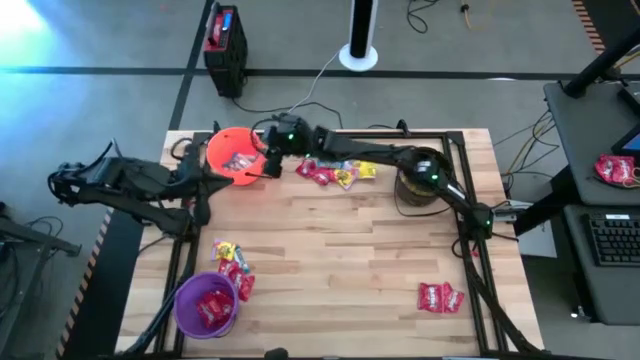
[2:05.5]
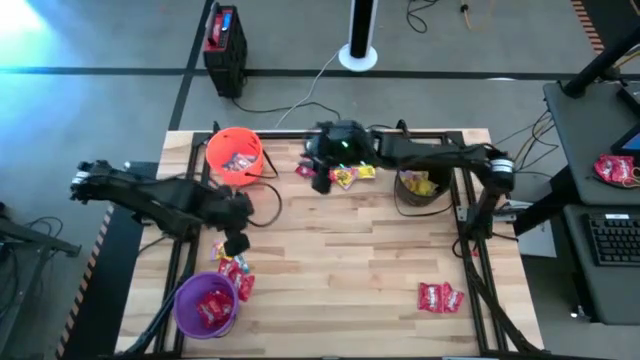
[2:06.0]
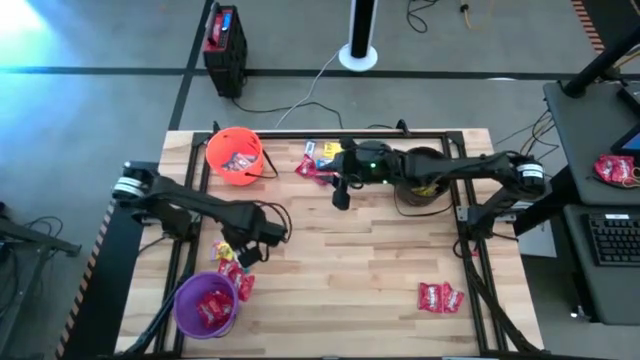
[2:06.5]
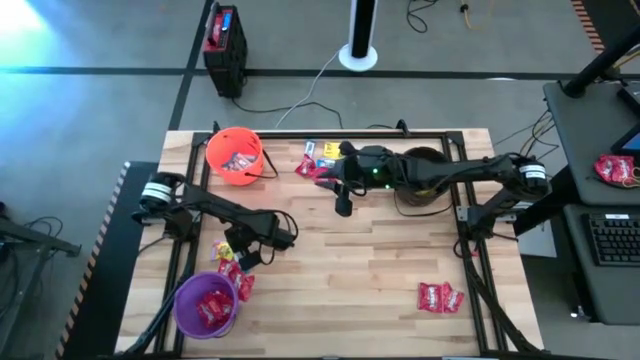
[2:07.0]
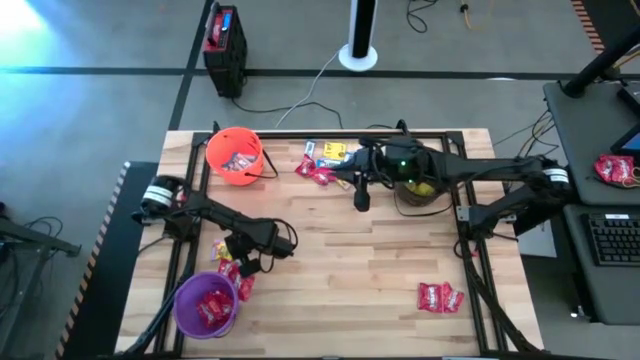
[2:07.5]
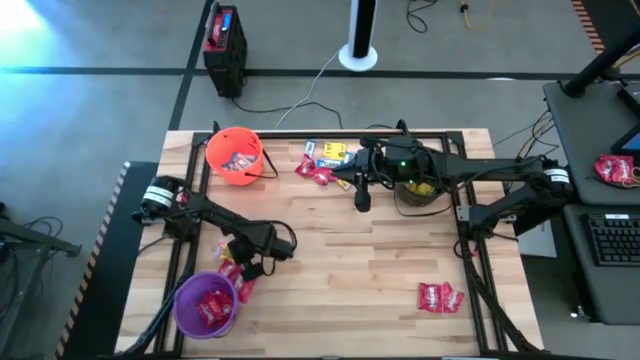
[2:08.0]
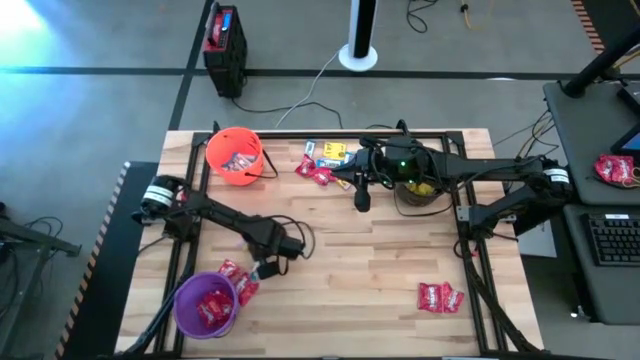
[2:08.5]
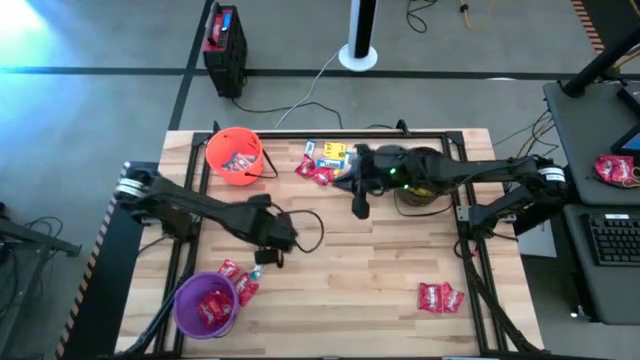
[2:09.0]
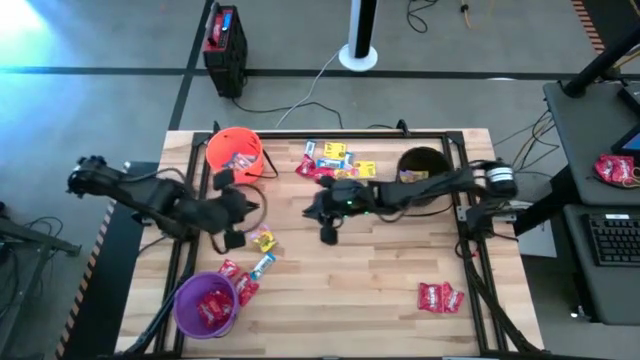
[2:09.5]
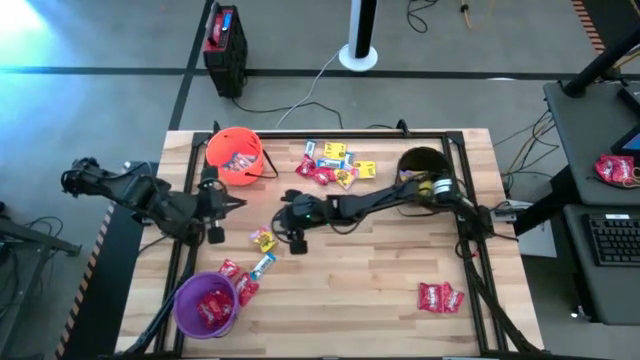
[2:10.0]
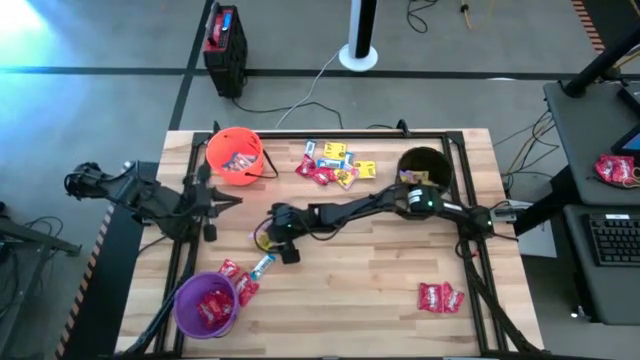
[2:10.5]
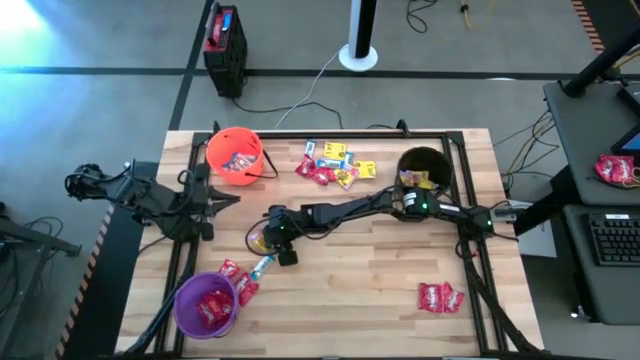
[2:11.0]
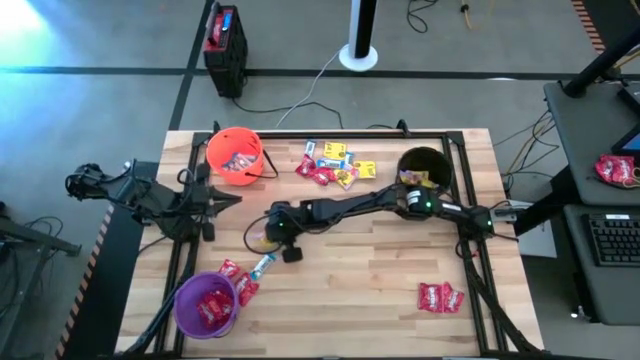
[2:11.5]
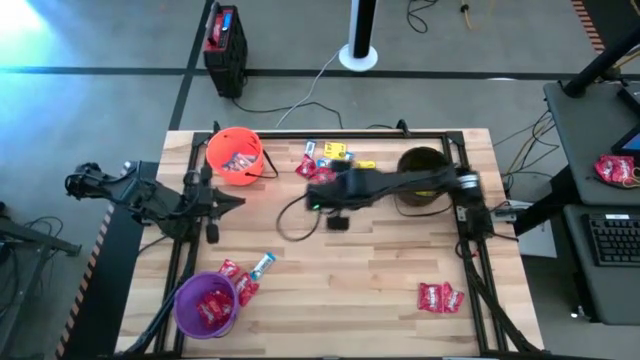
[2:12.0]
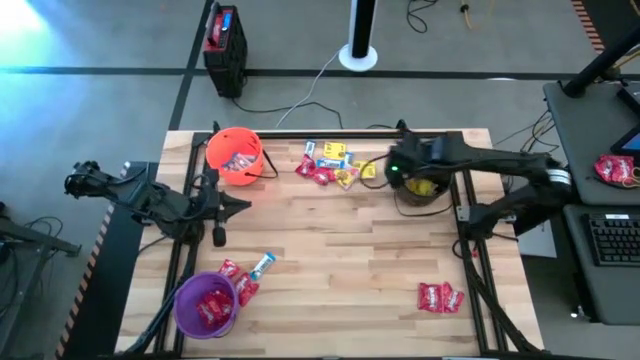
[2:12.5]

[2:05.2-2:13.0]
Task: Sort candy by brand, put in halloween buckets
Put the yellow candy into the black bucket

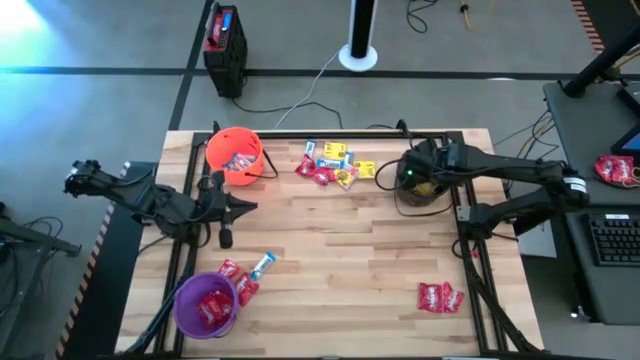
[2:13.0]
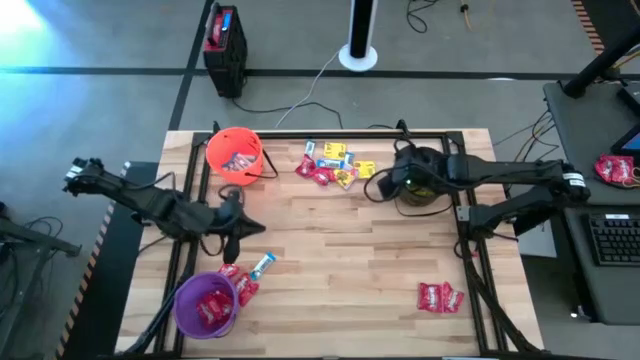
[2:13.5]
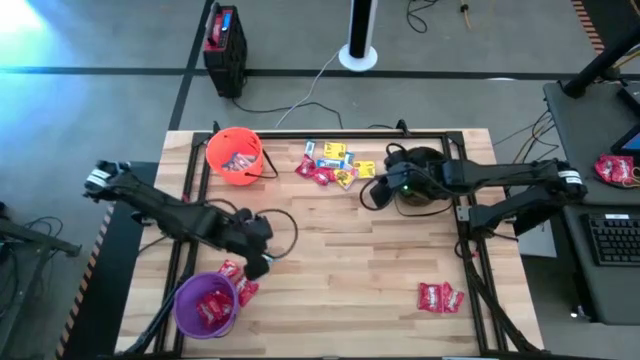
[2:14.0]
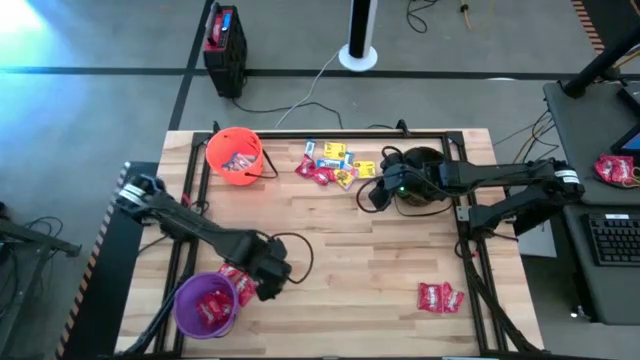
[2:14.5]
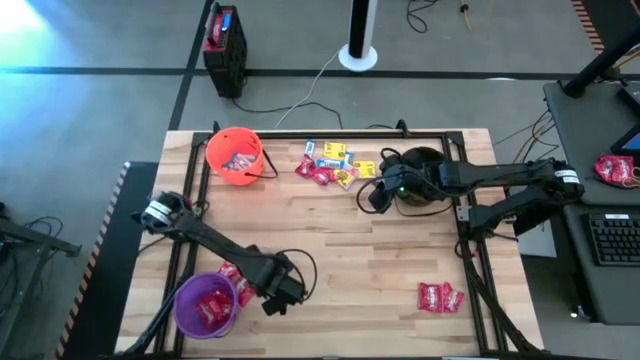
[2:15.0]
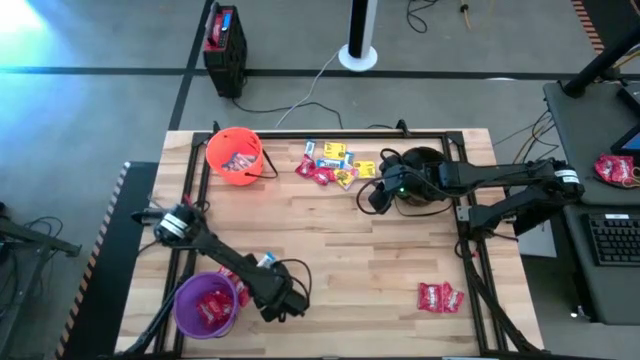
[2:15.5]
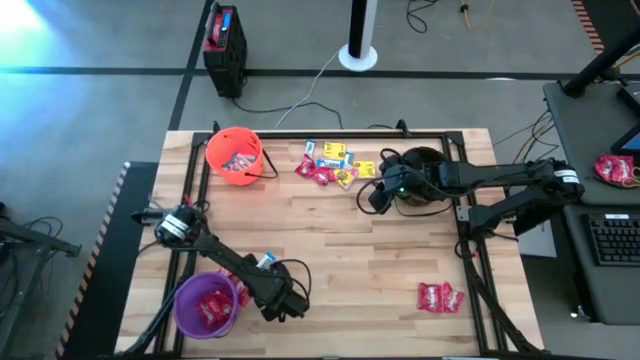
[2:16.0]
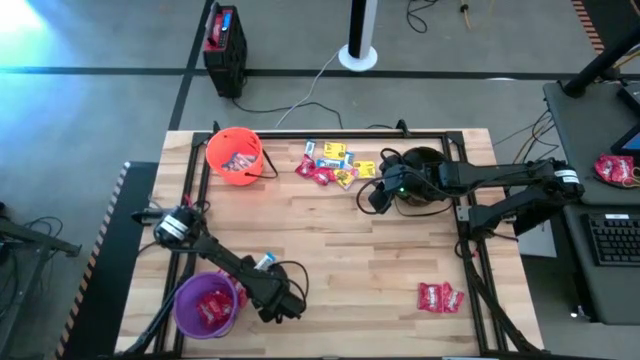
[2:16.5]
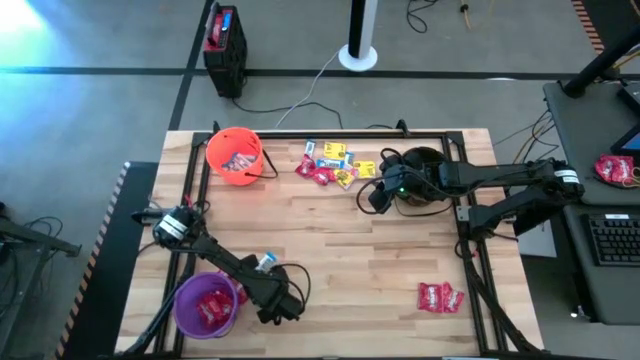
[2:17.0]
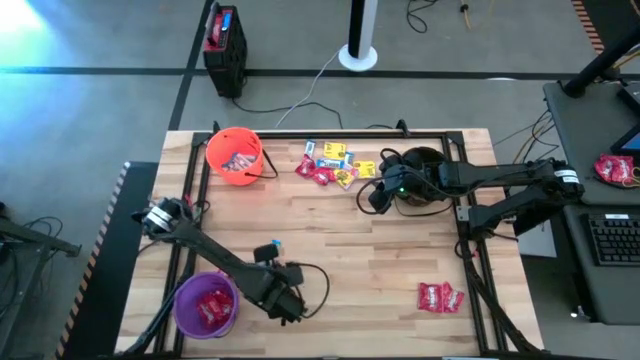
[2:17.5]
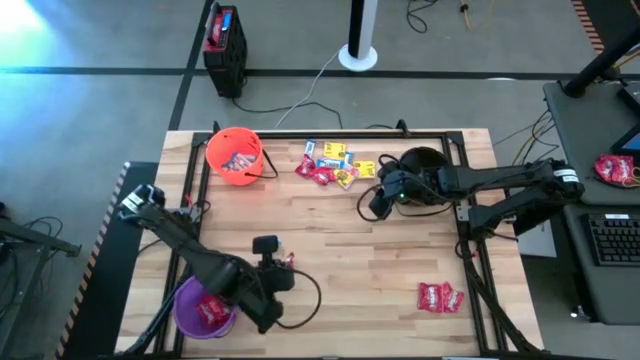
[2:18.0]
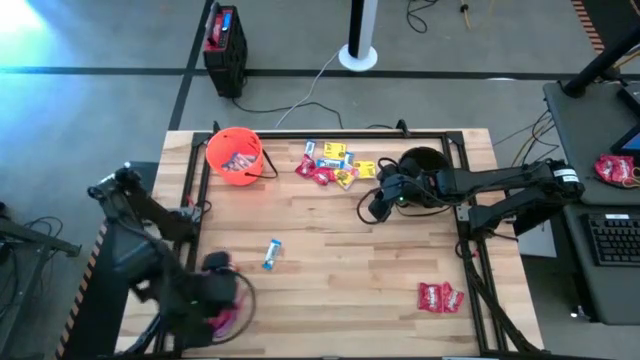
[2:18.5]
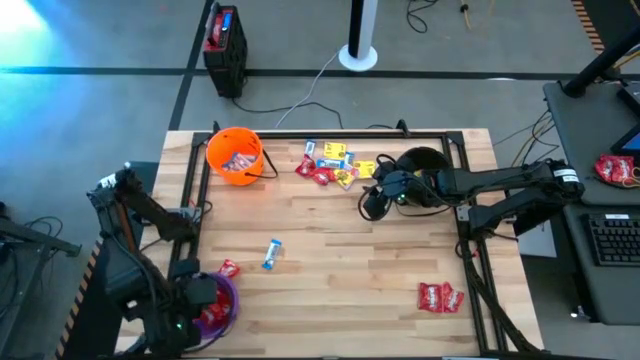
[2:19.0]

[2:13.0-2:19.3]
Put the red candy into the purple bucket

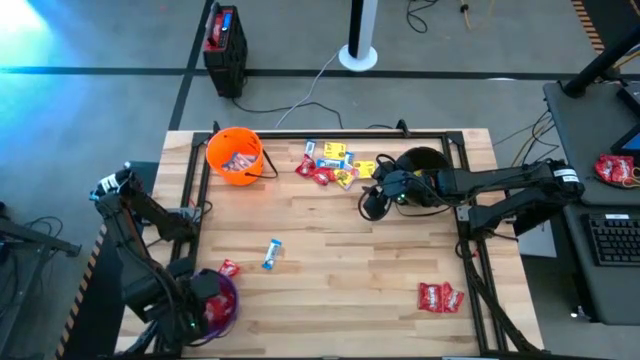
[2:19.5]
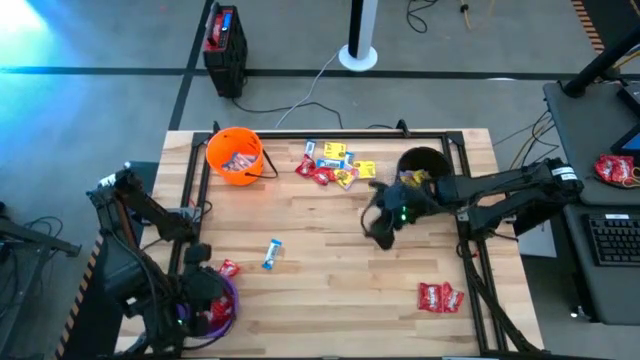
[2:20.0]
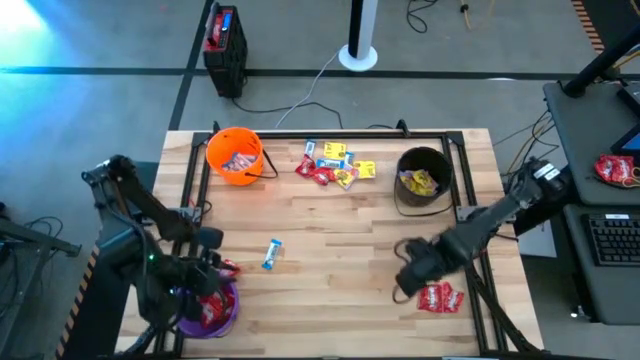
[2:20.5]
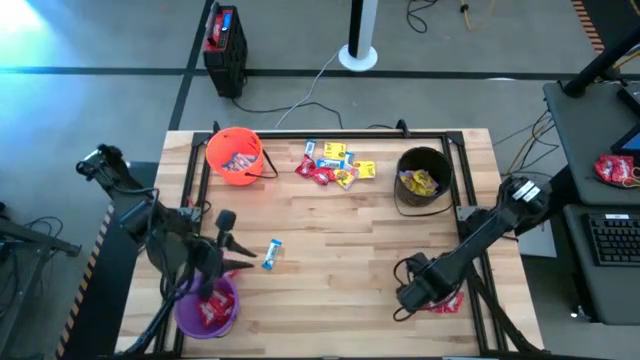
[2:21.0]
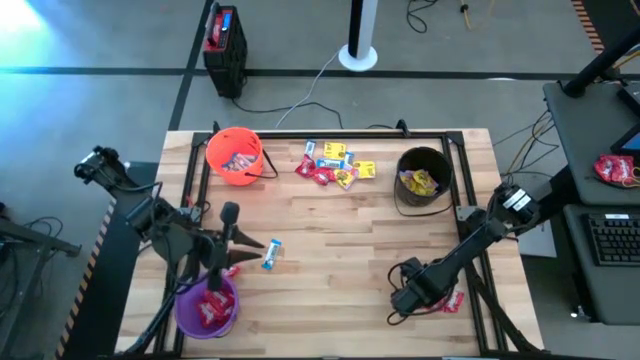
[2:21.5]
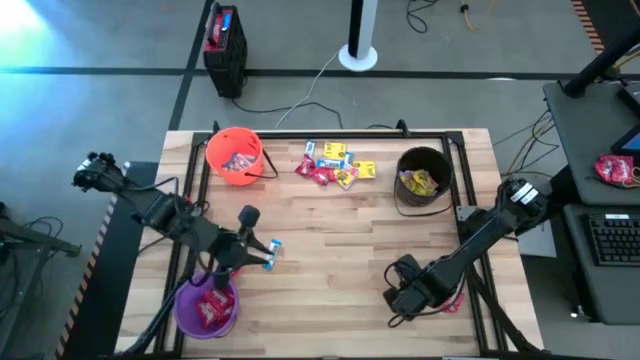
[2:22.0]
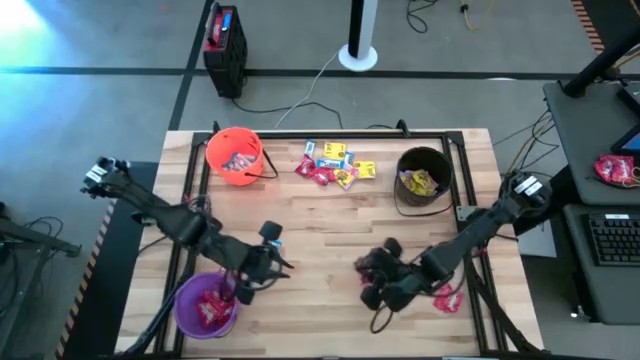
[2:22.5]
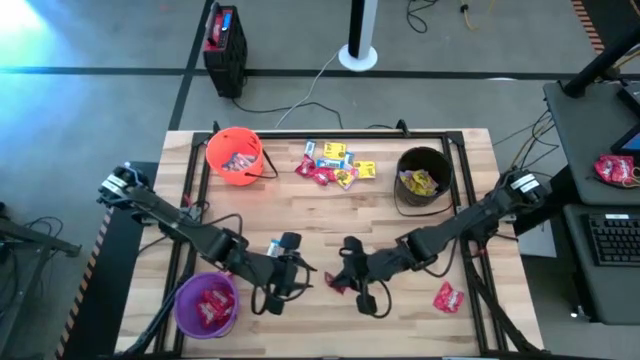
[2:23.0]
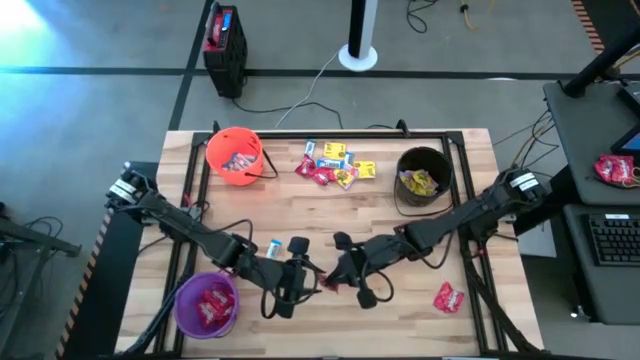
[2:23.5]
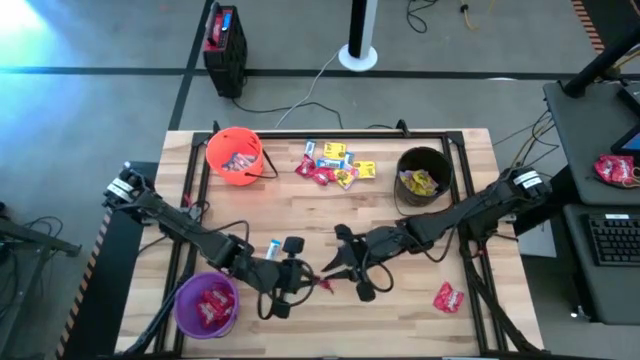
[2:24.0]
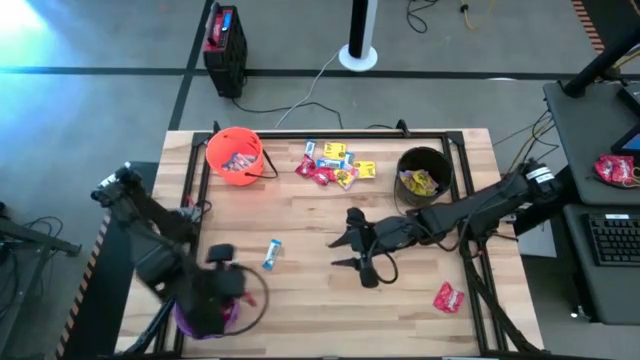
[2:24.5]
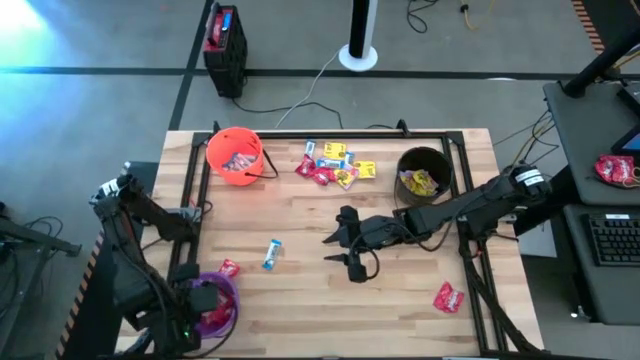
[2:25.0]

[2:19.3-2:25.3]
Put the red candy into the purple bucket

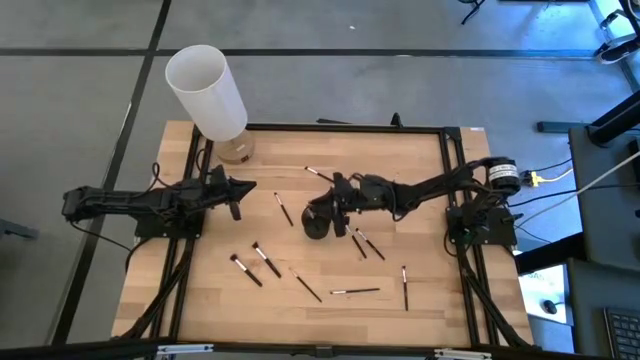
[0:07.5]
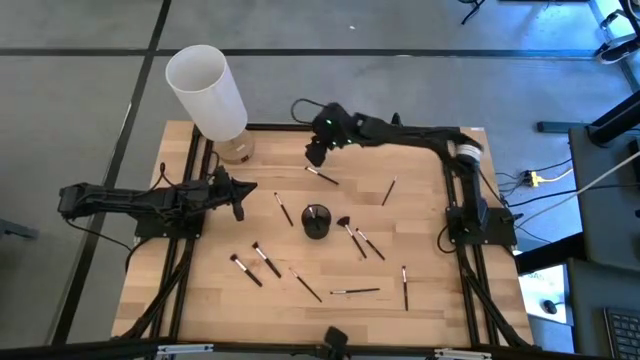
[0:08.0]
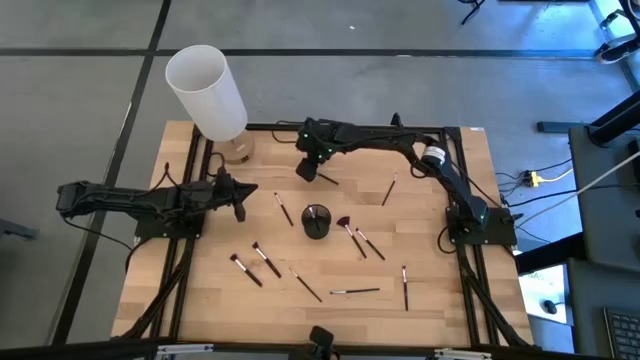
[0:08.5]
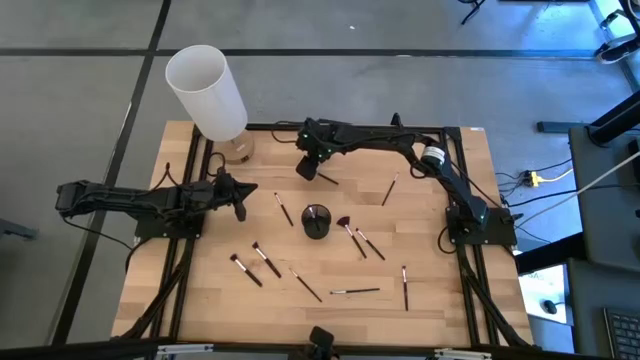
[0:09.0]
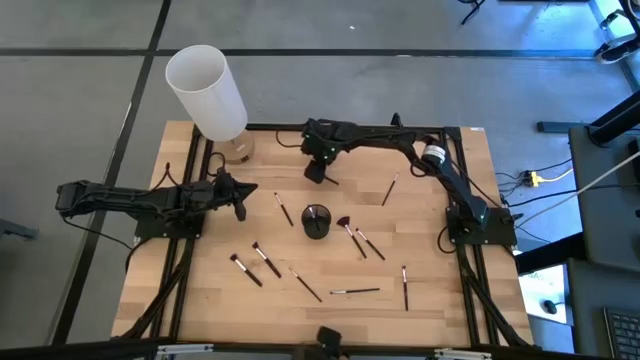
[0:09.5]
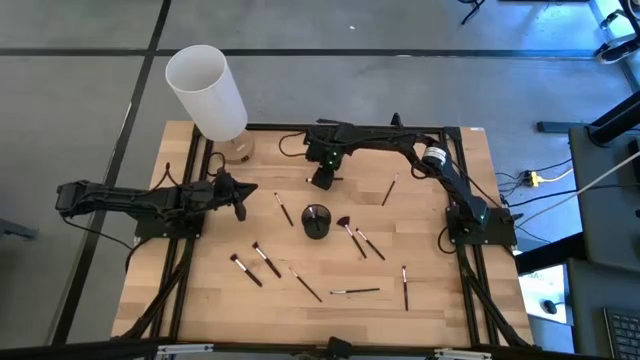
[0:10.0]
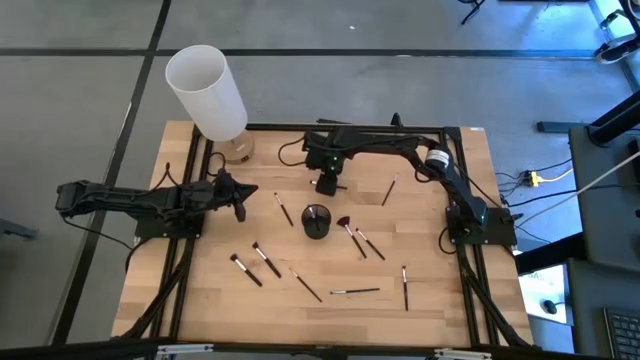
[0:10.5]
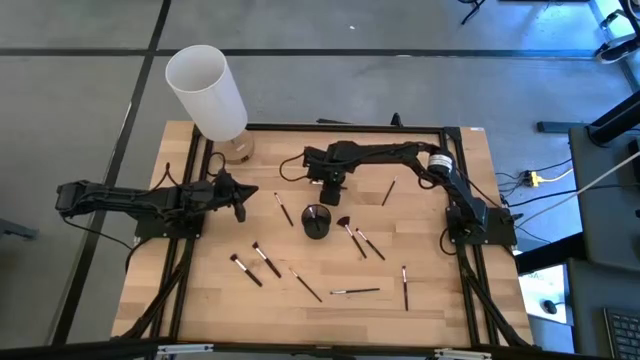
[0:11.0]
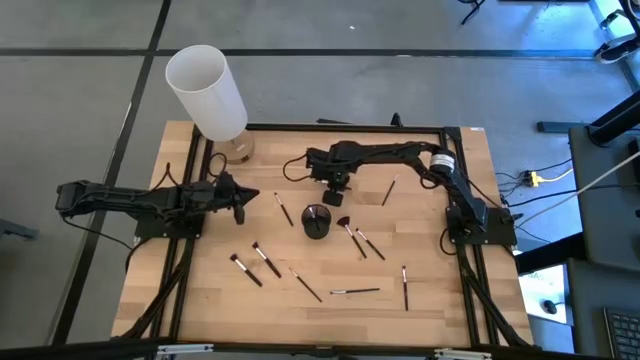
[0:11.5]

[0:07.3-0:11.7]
Task: Sort items
Put the silver eyeshadow brush into the pen holder
